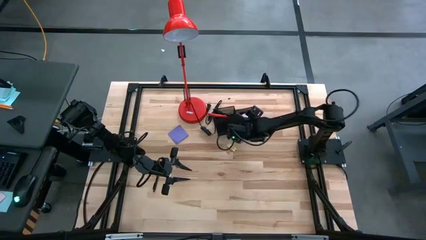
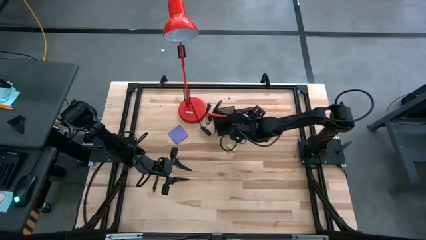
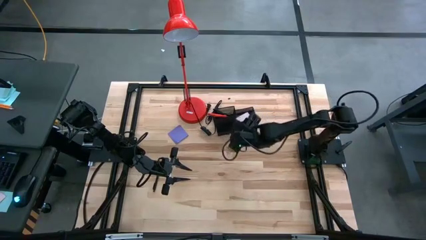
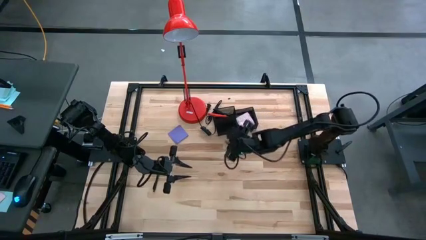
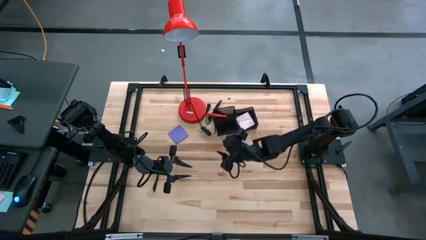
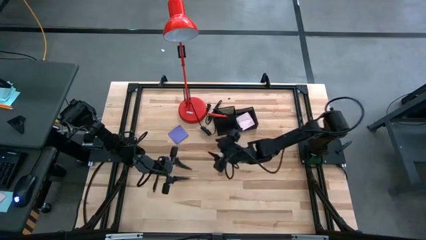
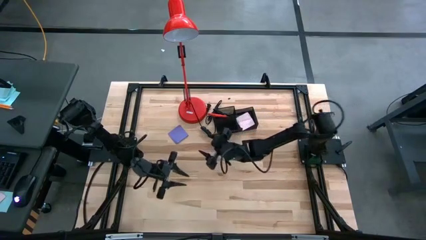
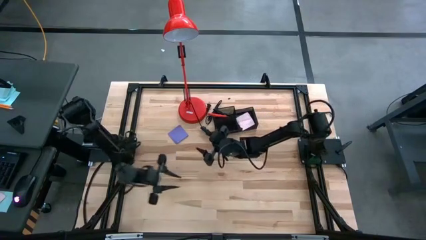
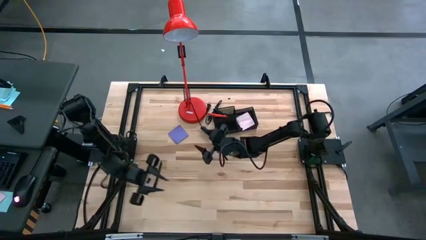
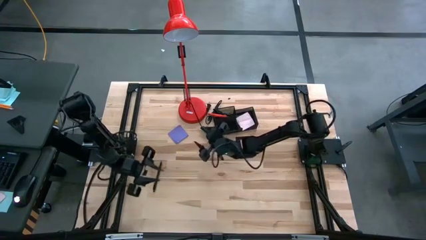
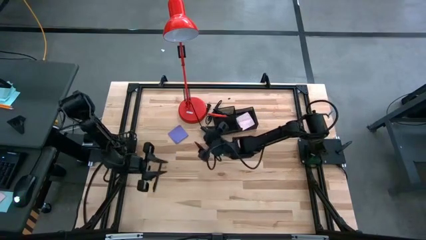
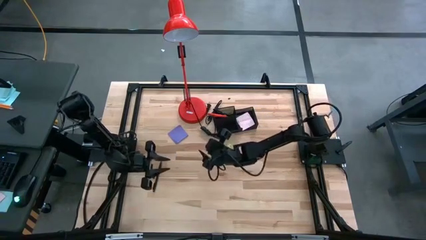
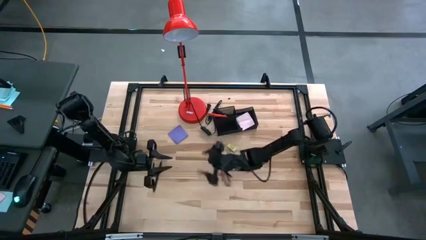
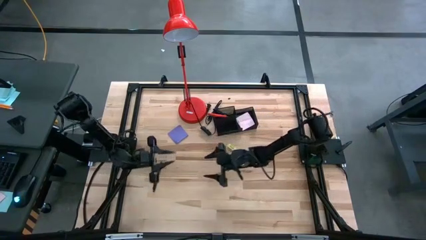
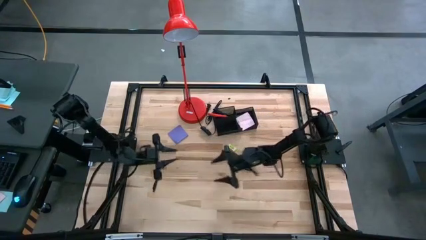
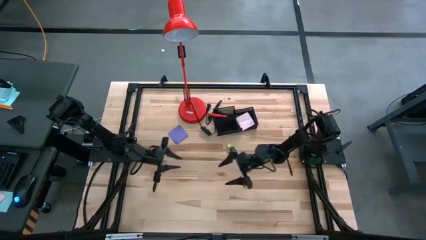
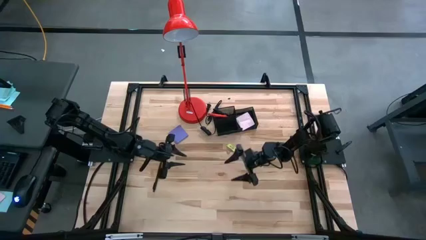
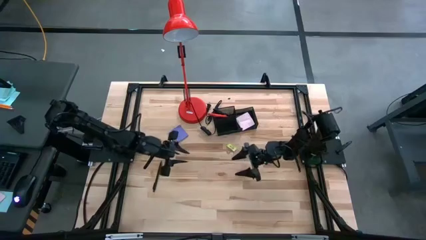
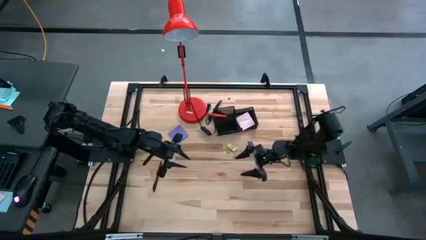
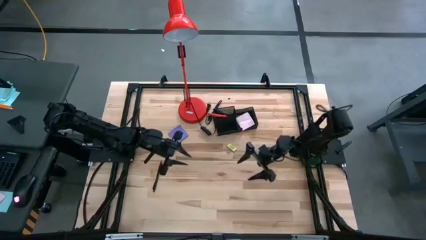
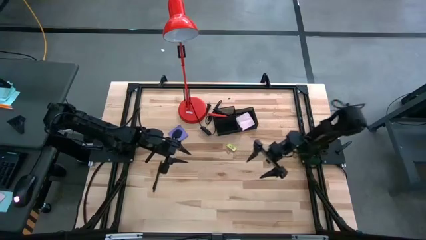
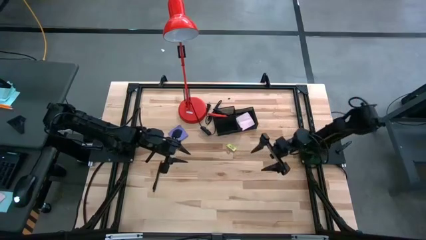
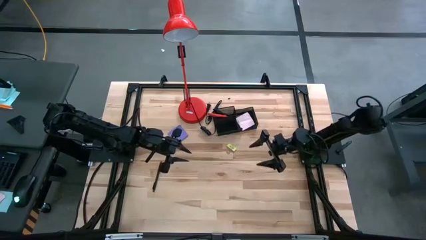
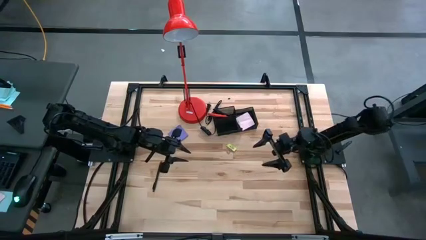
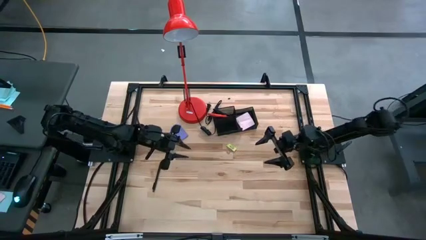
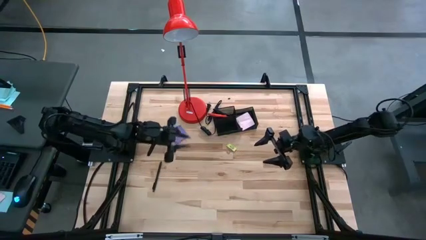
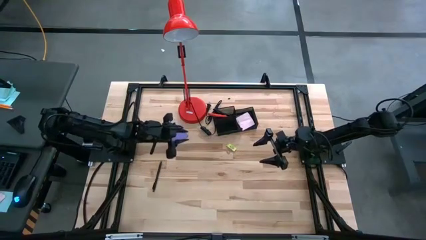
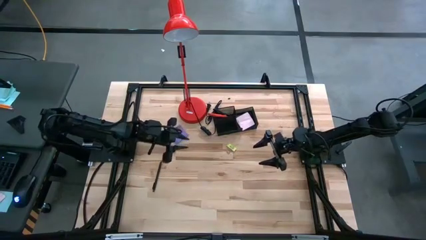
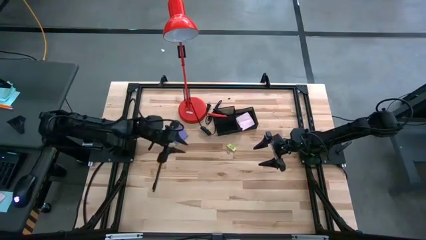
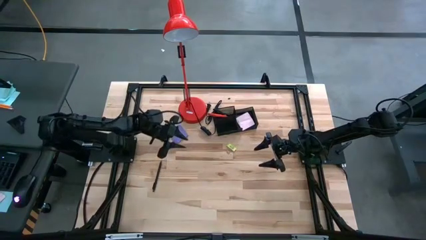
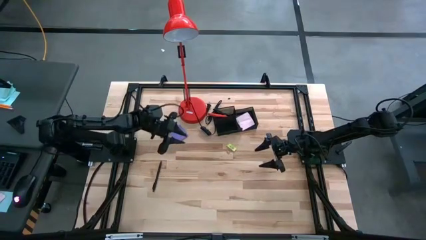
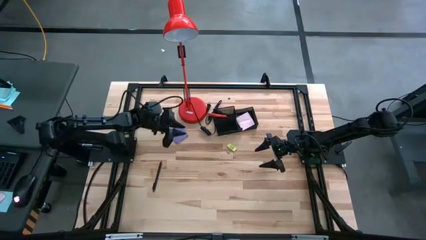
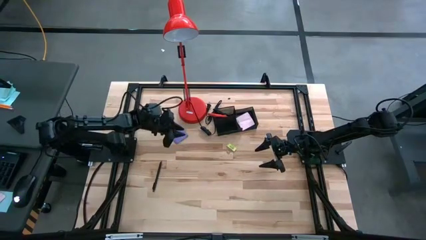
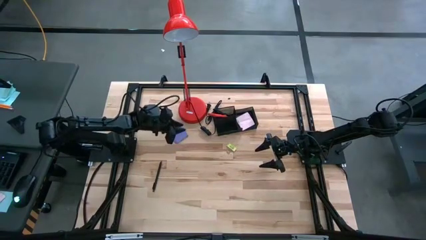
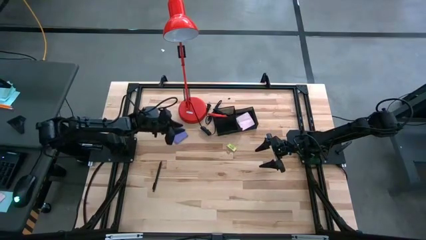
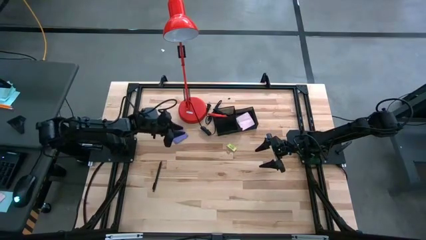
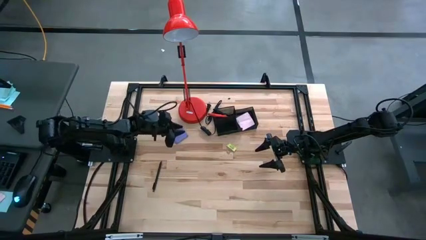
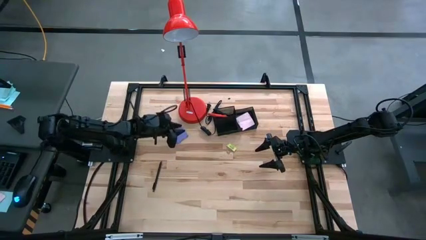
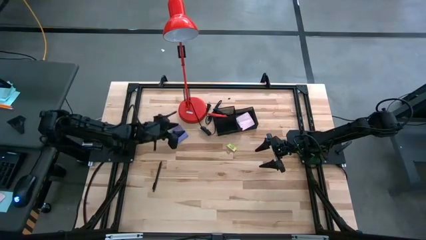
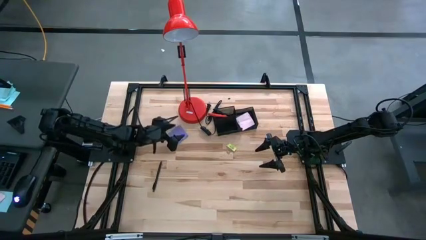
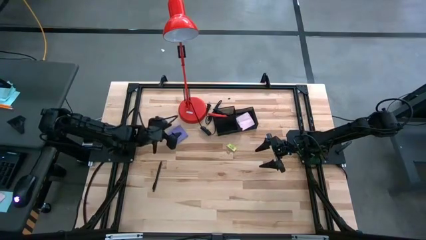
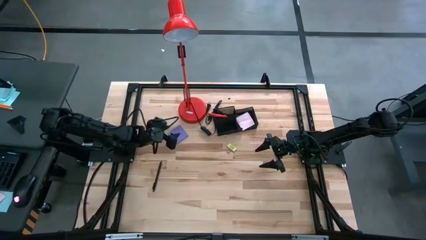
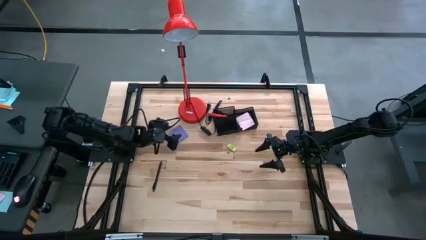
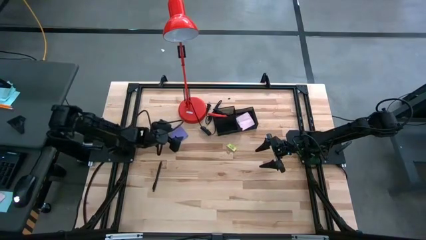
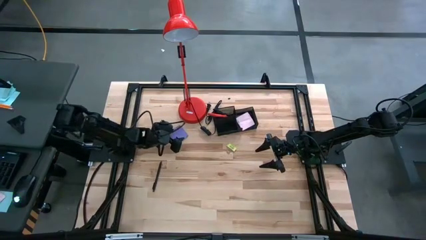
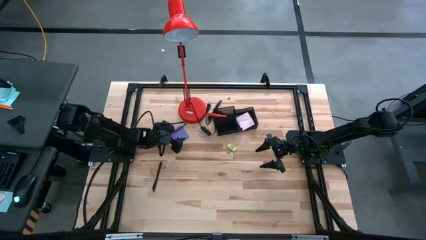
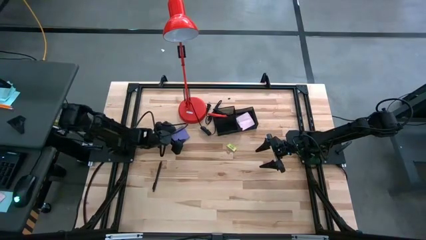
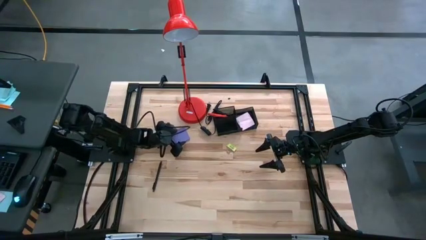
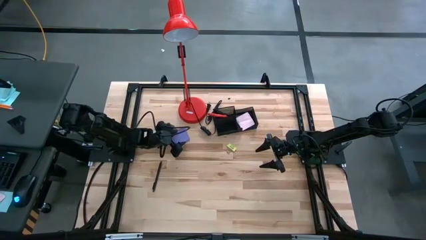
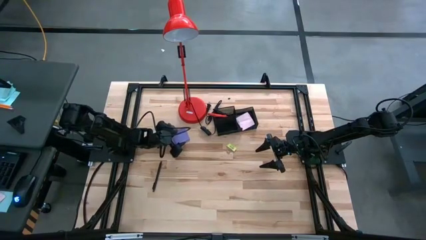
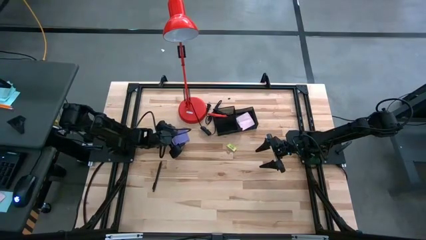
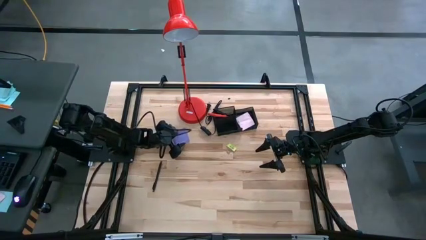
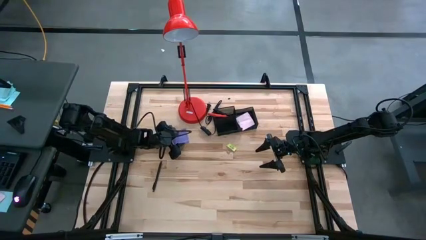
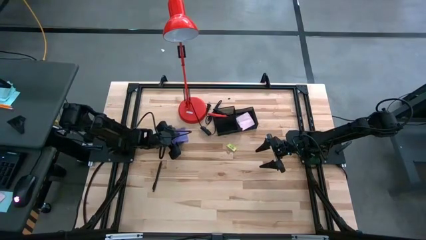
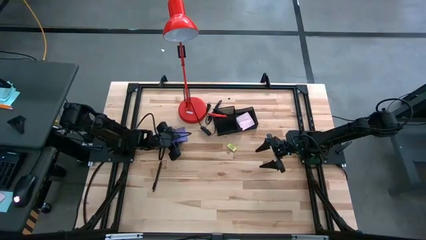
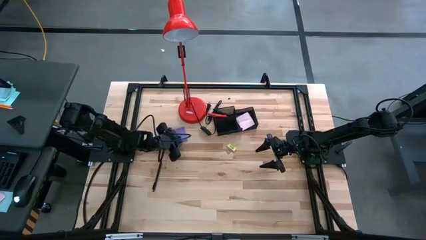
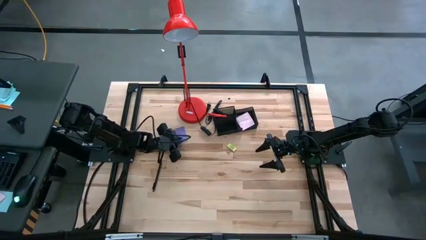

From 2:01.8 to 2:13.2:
Task: Pick and place office supplies into organizer
Put the blue sticky notes into the black desk organizer
